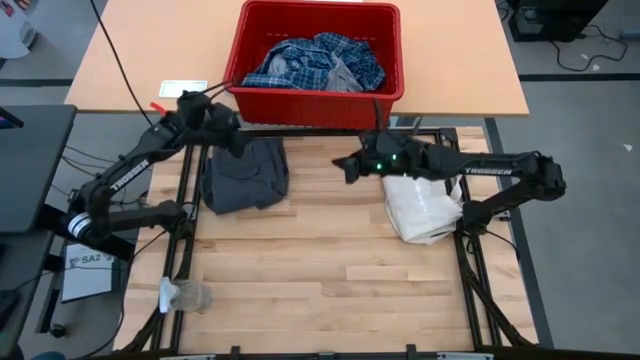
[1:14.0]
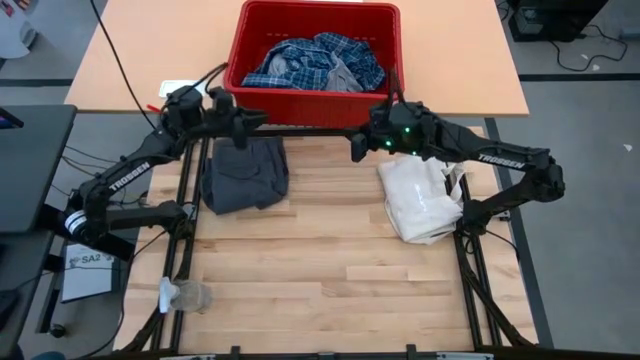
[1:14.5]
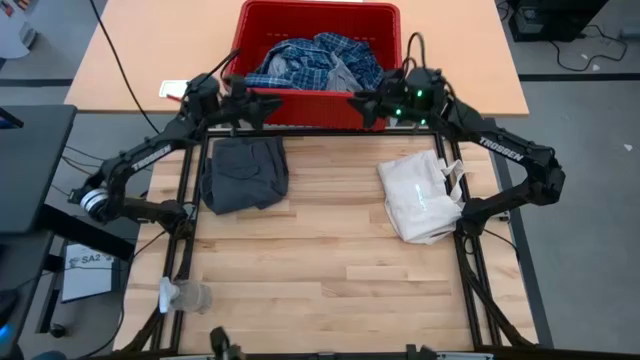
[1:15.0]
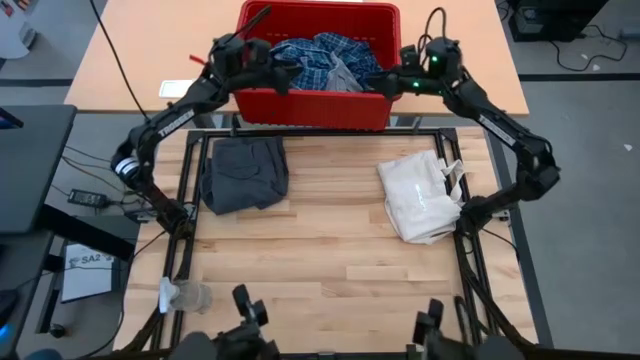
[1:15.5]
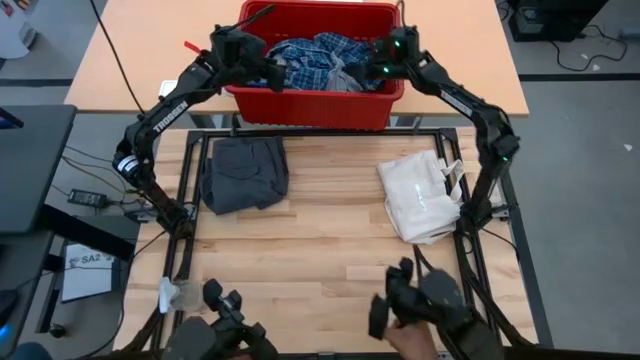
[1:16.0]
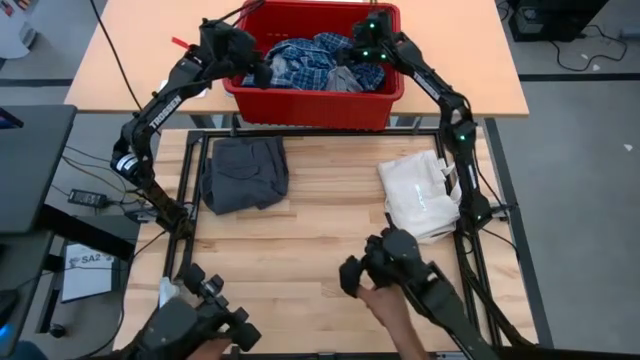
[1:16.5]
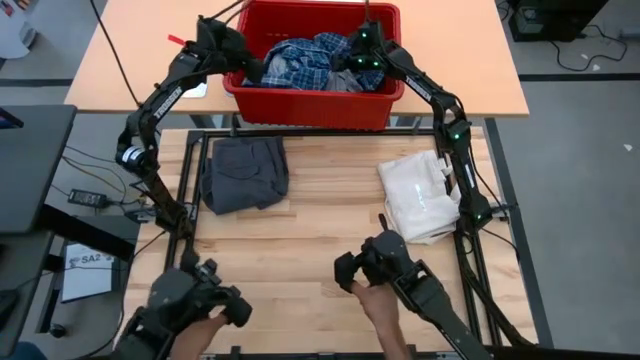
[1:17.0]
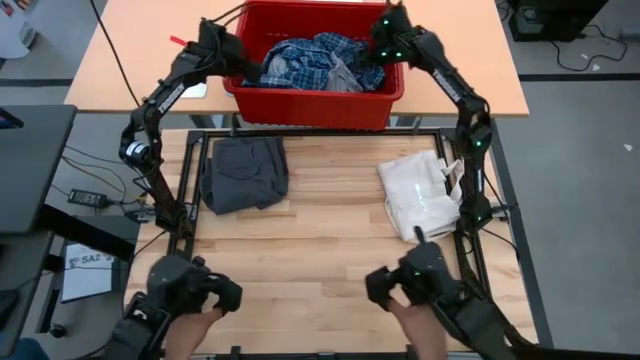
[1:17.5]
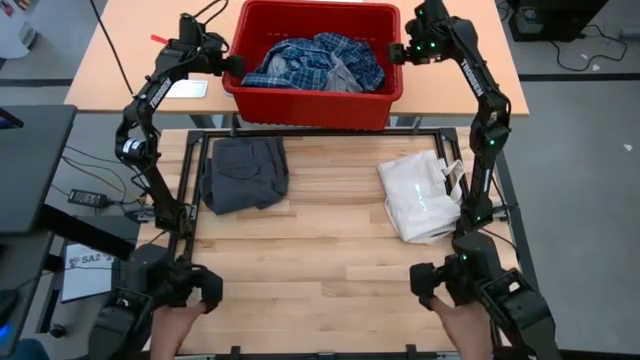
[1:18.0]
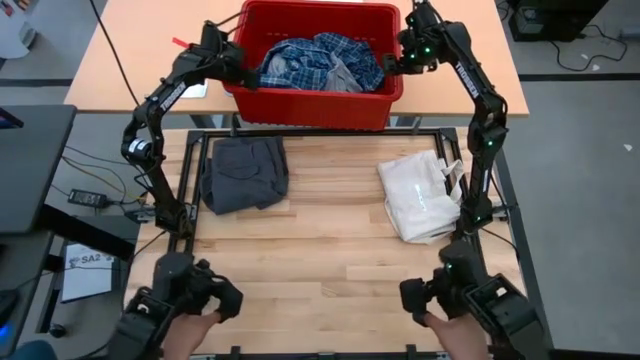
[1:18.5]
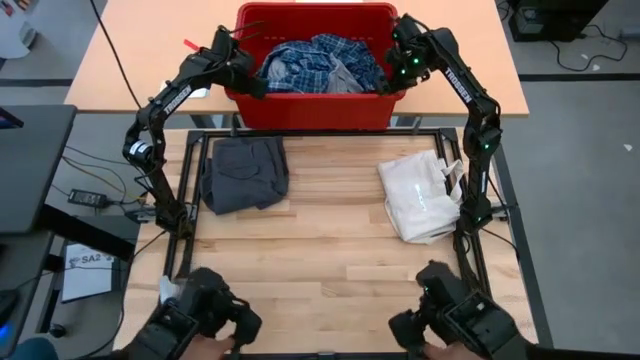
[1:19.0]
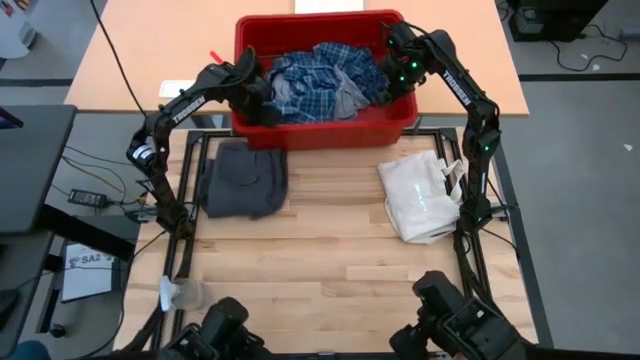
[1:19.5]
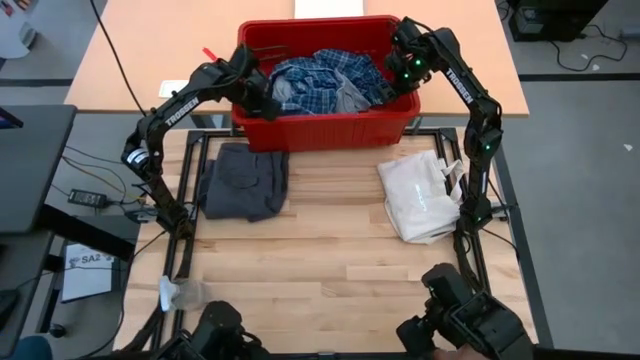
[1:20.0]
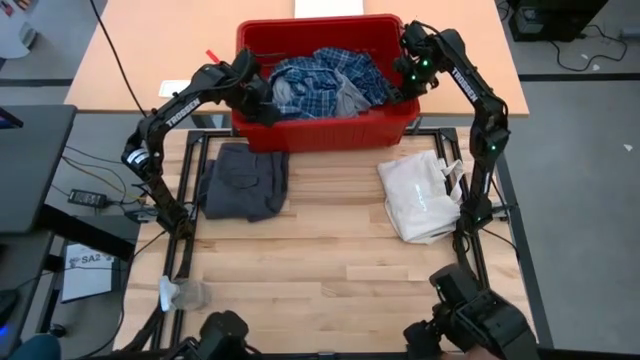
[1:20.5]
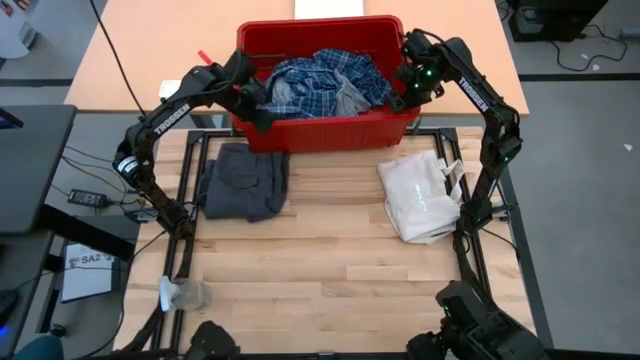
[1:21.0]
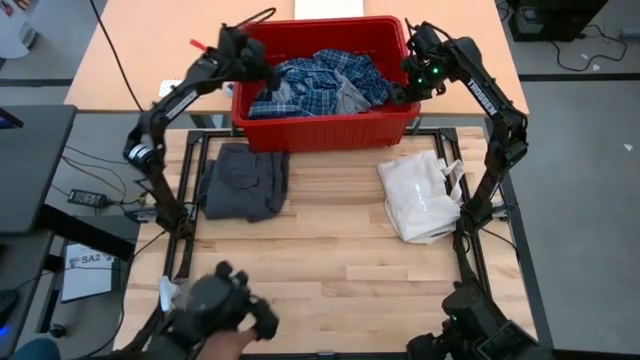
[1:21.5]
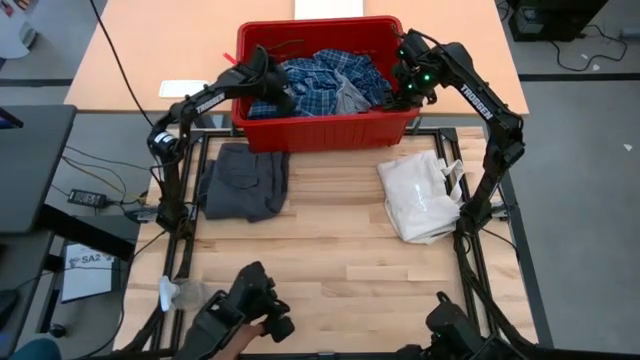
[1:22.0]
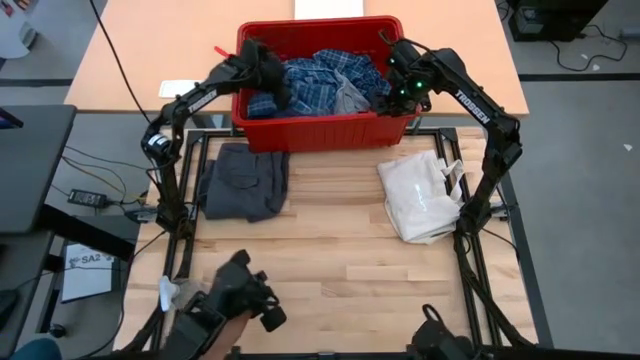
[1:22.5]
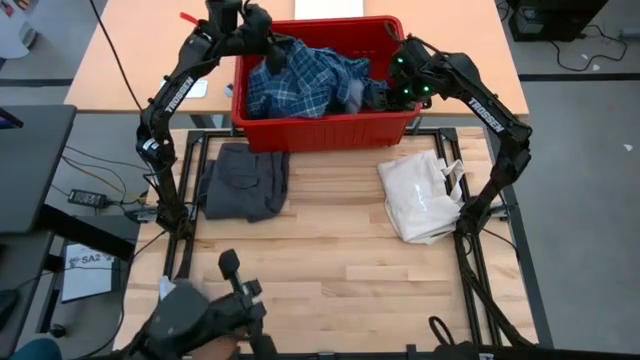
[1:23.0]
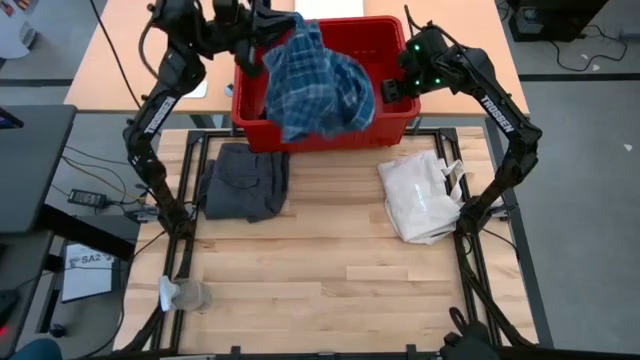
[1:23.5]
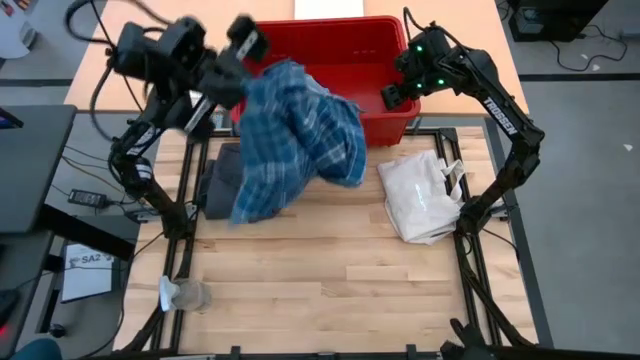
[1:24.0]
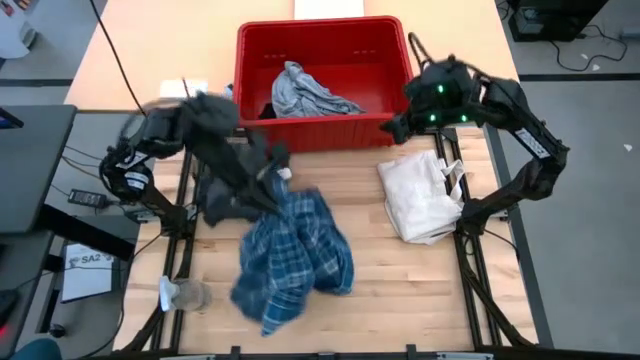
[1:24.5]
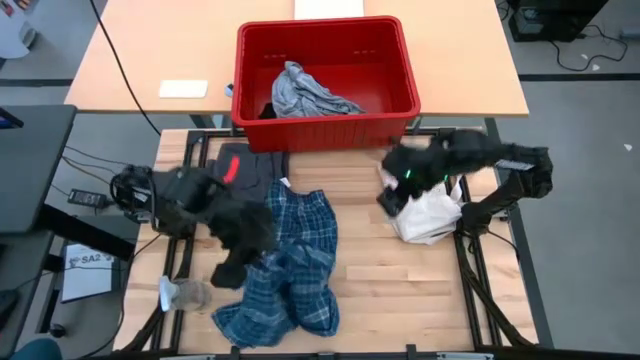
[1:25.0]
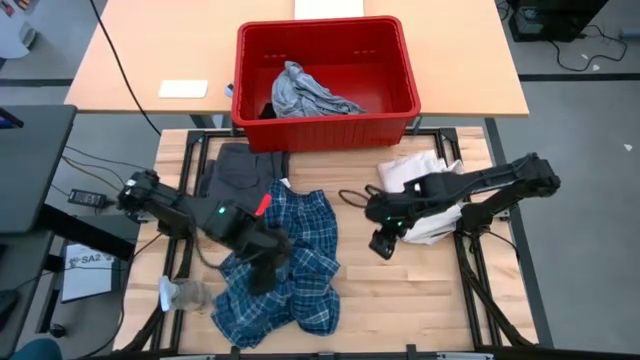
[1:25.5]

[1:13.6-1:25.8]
Task: Fold Laundry from Bin
Remove the plaid pants from the laundry bin

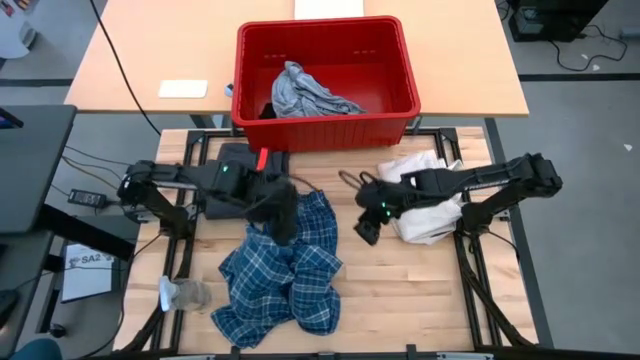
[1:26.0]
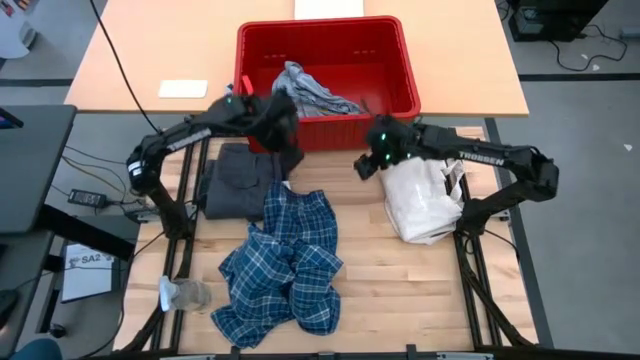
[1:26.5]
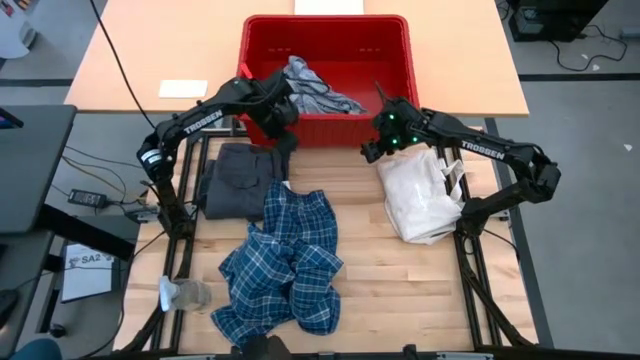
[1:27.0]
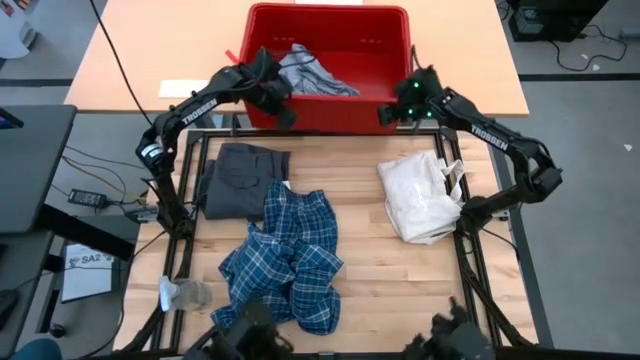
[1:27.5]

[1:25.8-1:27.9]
Adjust the laundry bin

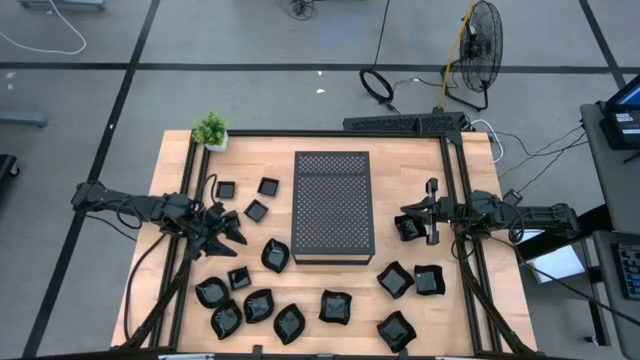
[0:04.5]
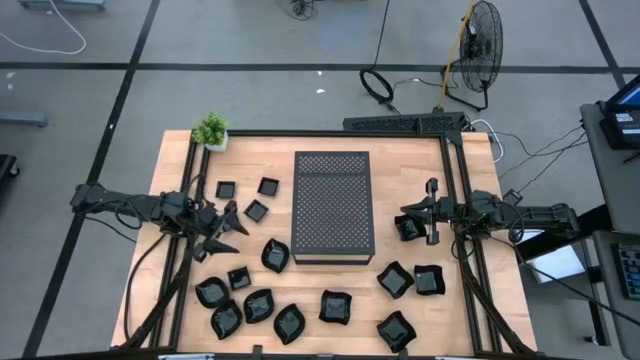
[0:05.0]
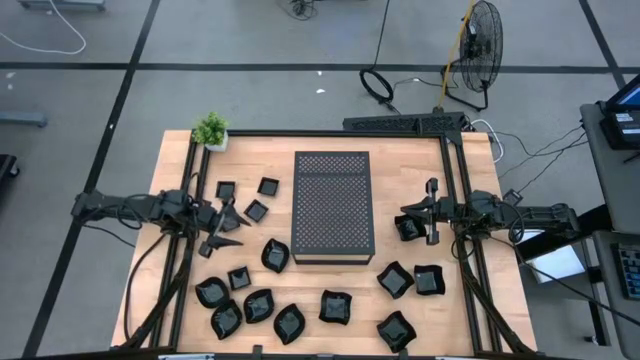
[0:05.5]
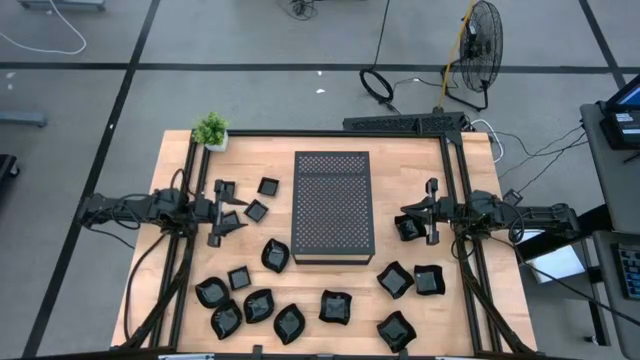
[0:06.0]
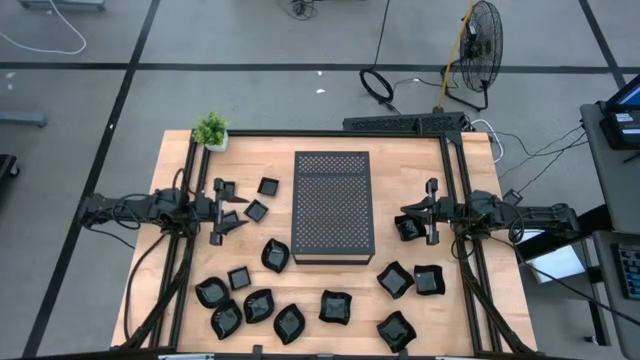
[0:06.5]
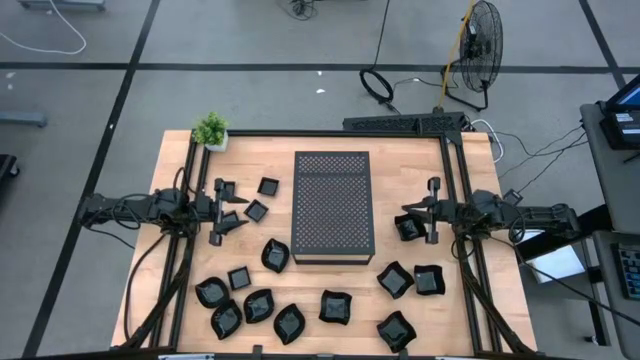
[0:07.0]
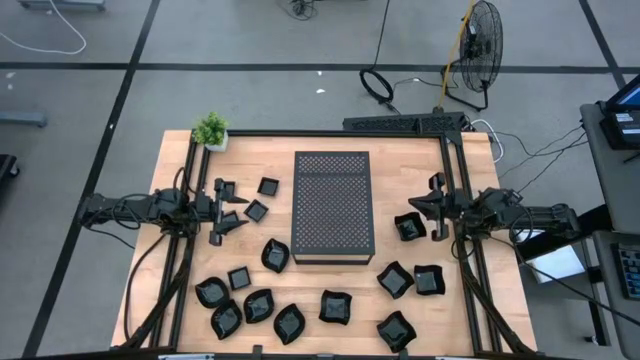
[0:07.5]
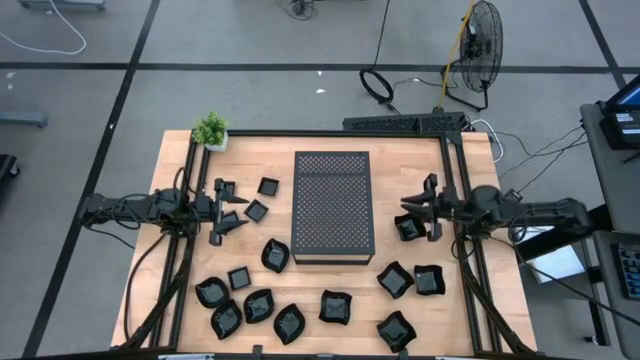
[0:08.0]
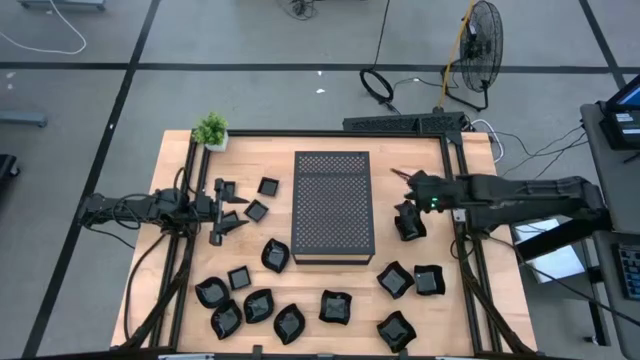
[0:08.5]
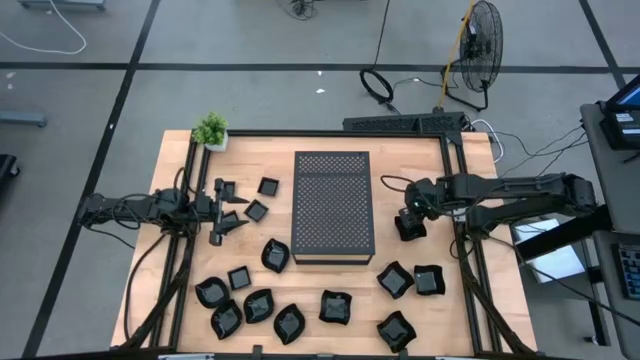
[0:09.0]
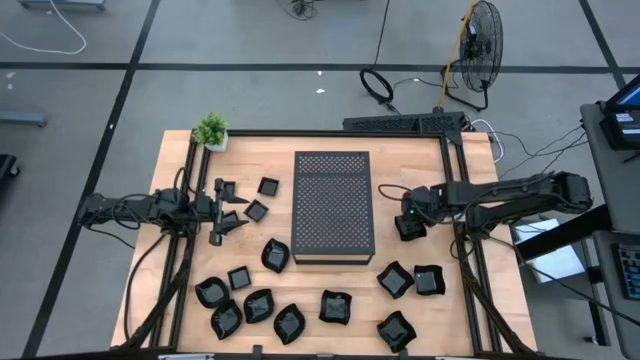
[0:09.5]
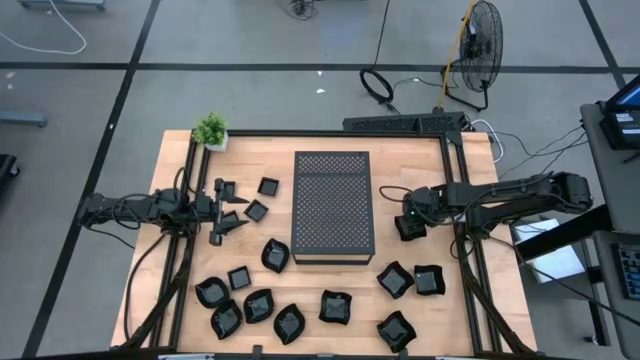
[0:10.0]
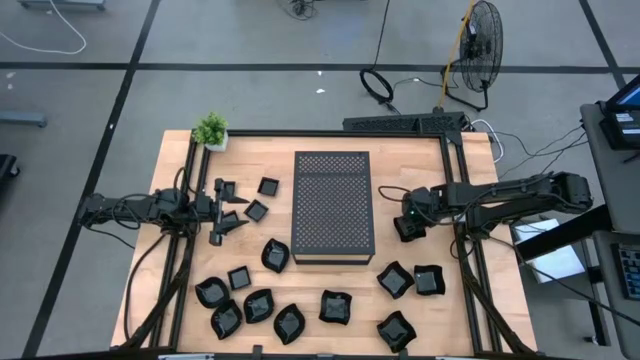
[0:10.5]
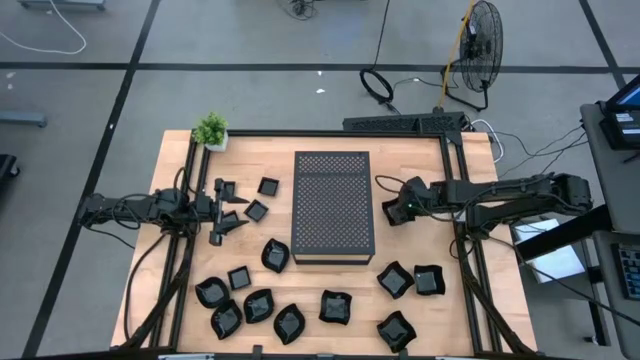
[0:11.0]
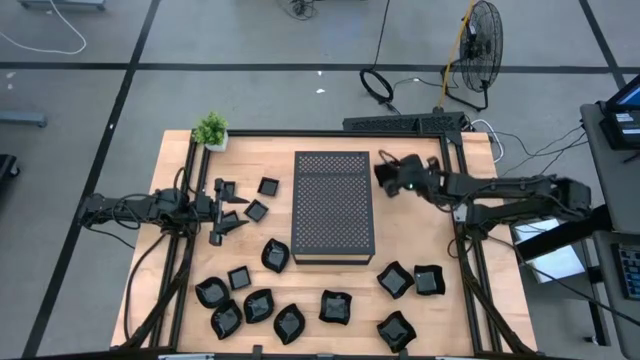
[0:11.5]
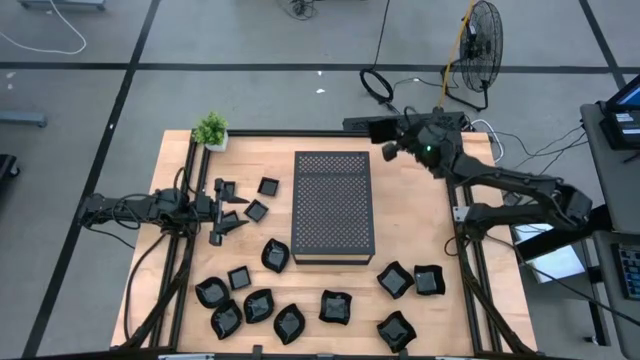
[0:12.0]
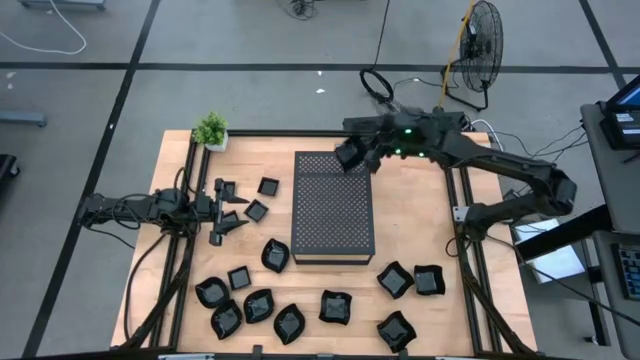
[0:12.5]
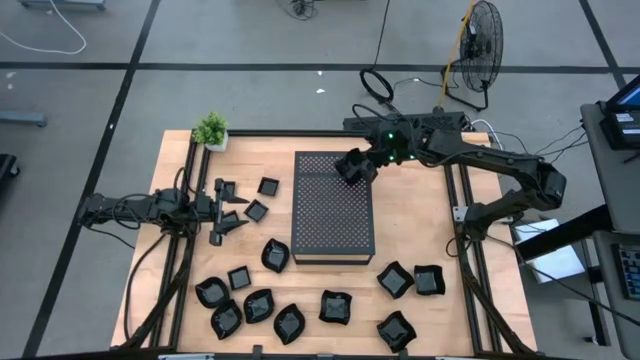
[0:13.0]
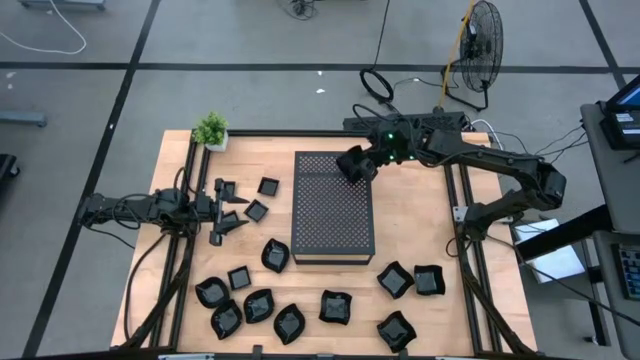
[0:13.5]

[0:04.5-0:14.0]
Task: Pick & Place Mini shaped plates
Put the black distorted square plate on the shelf
